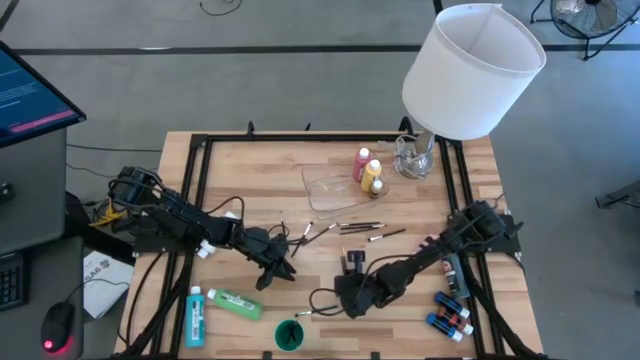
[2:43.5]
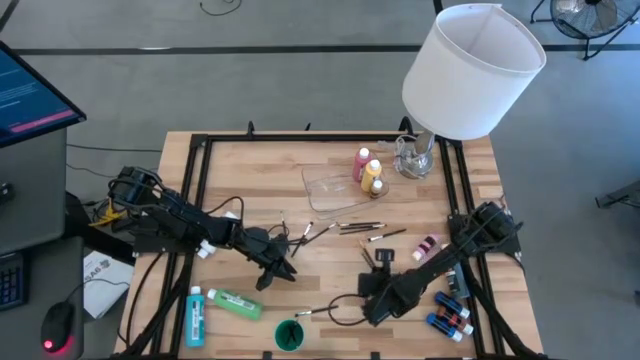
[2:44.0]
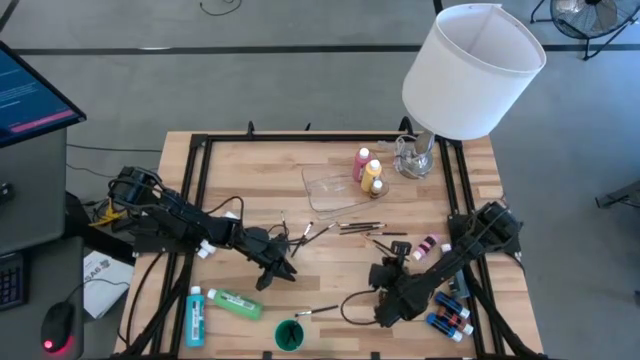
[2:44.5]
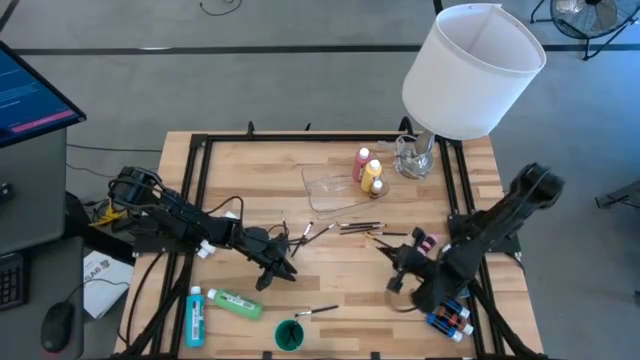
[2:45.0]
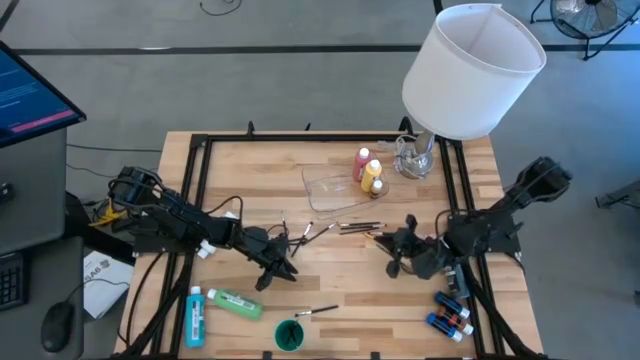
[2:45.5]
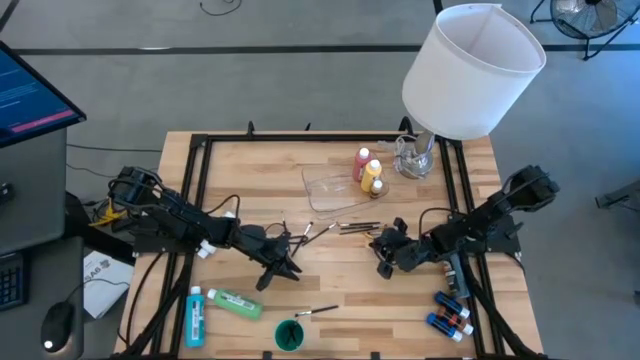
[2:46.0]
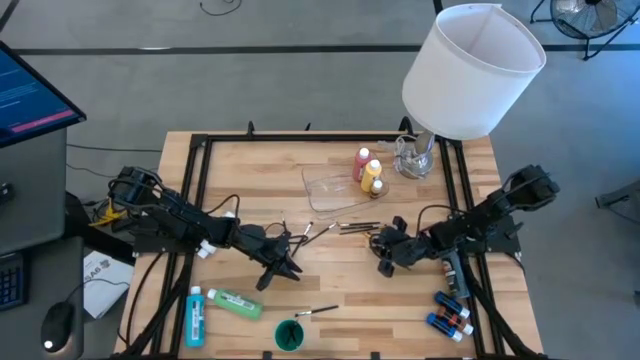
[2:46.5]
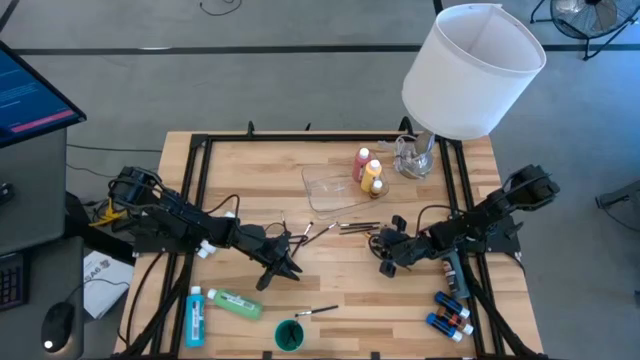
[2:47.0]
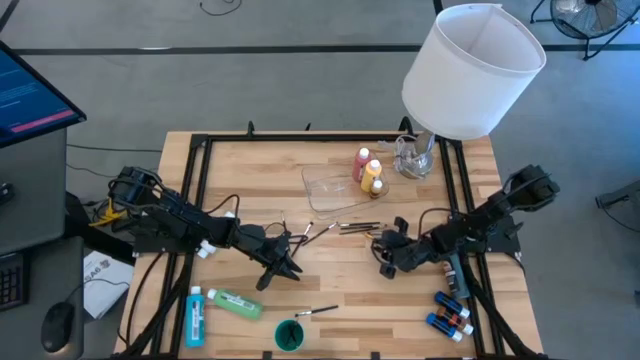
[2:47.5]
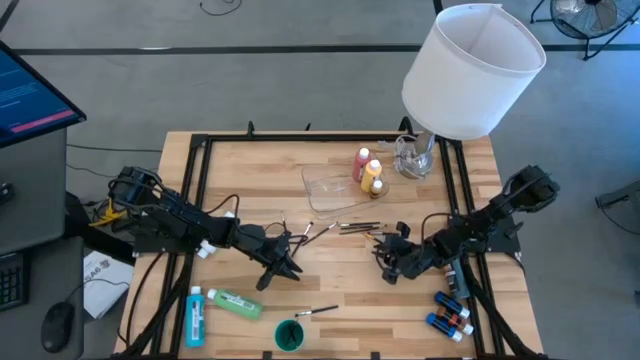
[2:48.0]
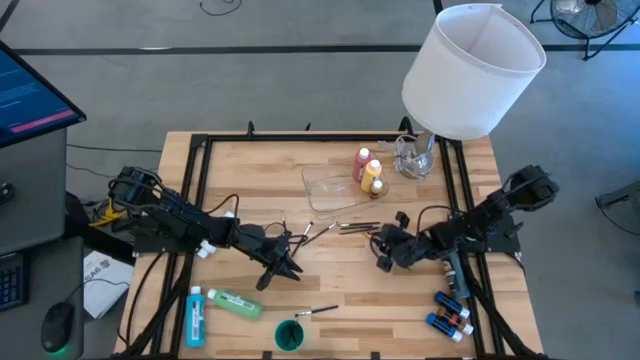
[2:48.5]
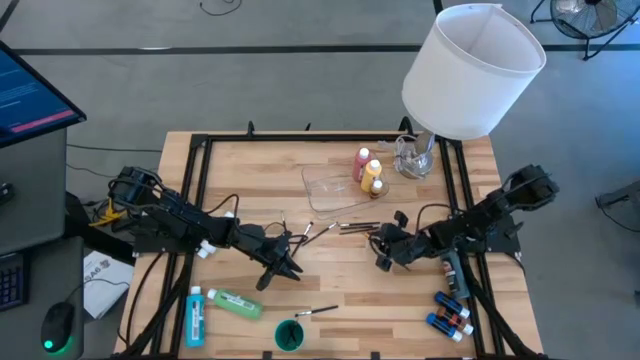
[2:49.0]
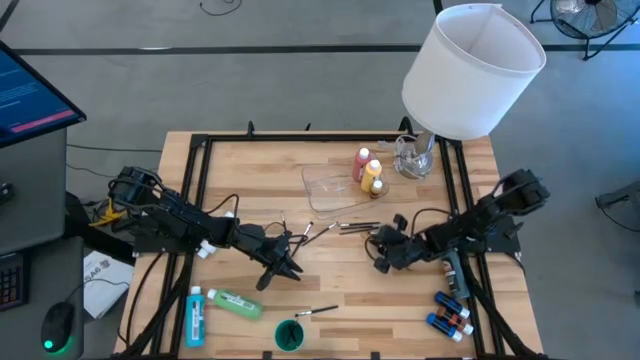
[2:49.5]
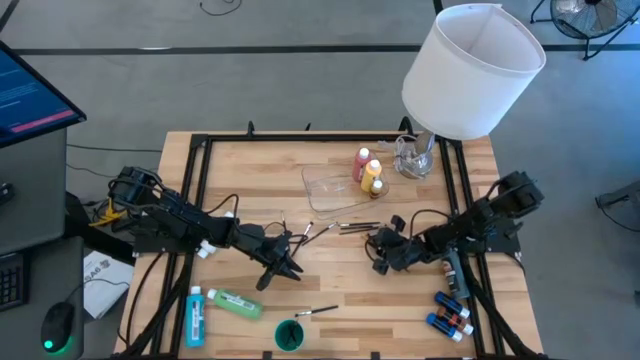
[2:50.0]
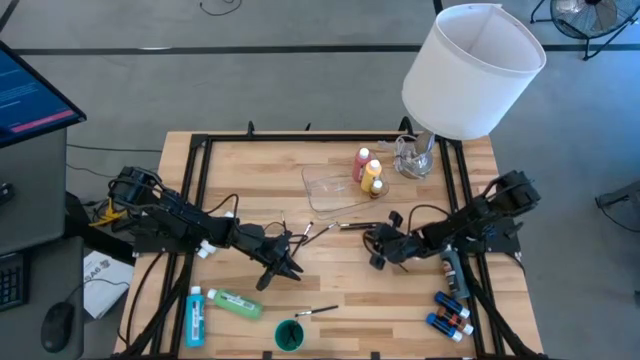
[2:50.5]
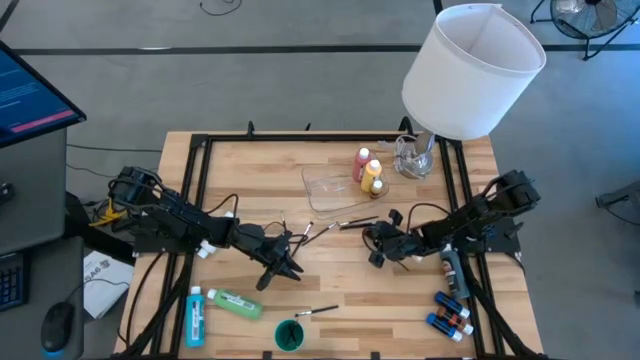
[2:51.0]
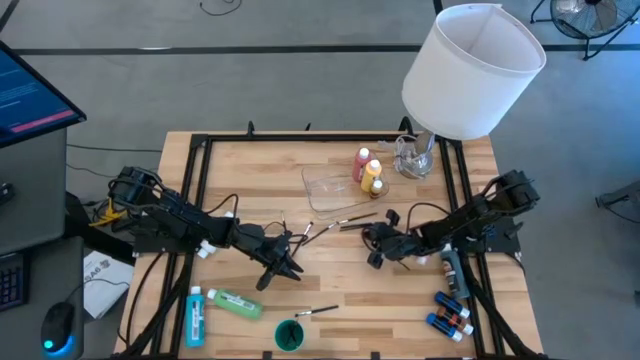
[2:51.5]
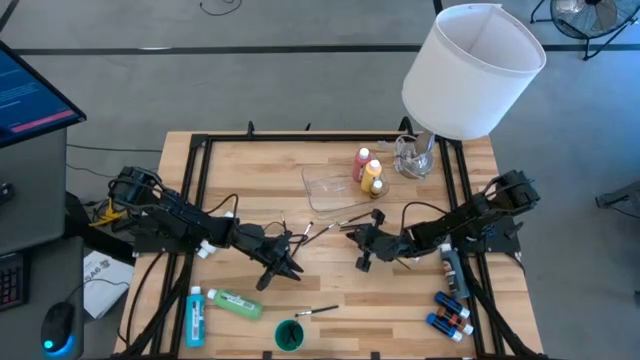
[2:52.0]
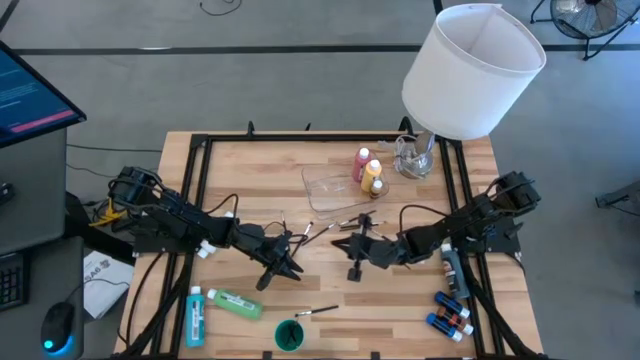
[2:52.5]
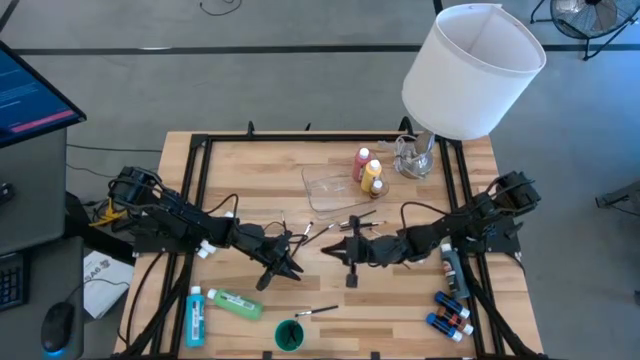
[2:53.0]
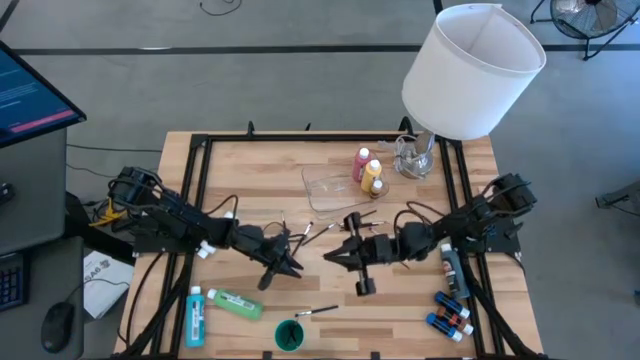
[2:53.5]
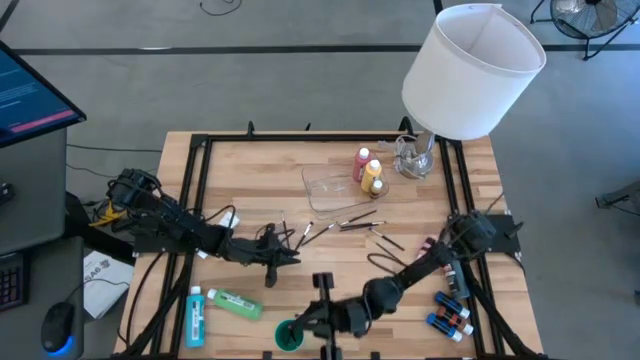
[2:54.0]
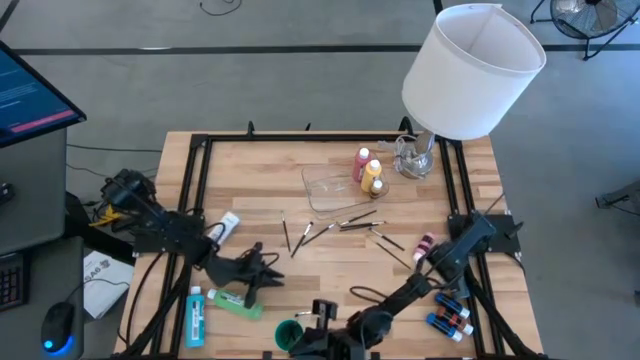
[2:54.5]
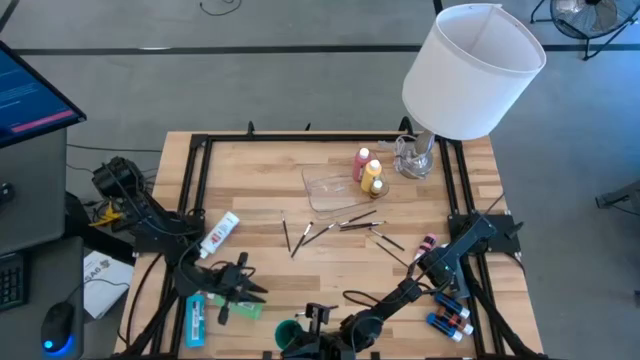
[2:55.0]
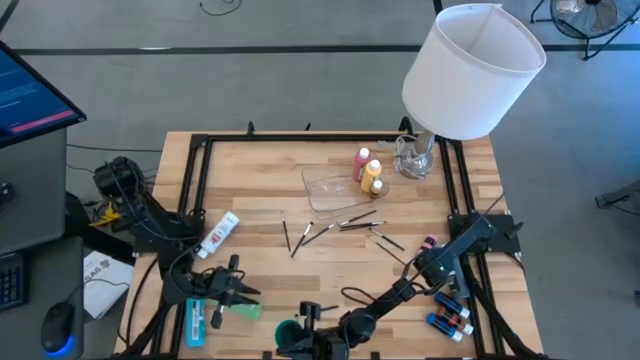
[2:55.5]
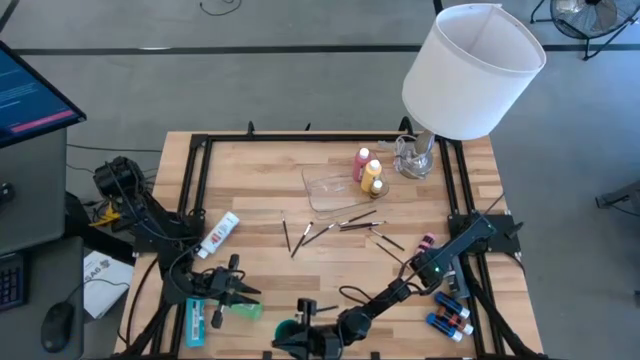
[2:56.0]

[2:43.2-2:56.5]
Task: Pick & Place Paint Supplies
Put the gold paintbrush into the green cup
